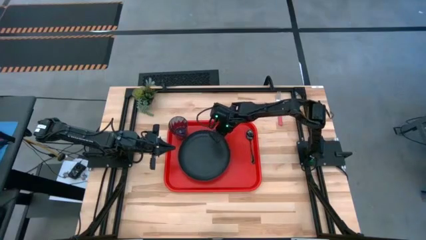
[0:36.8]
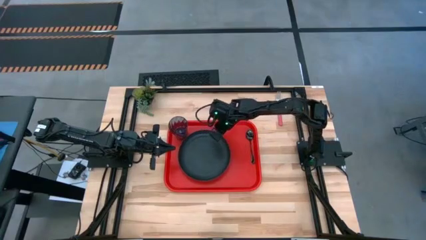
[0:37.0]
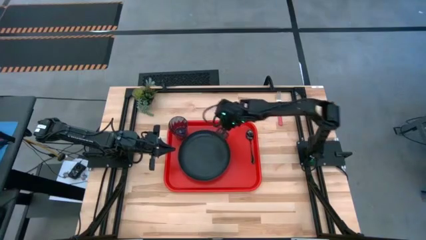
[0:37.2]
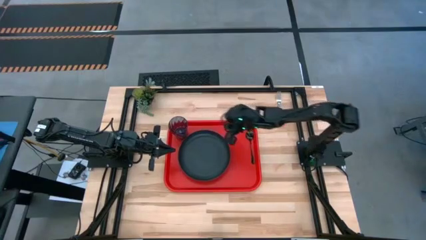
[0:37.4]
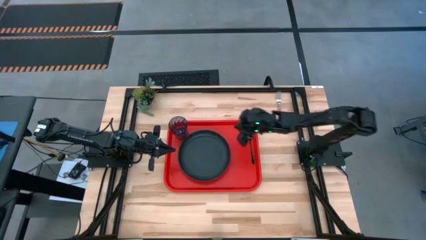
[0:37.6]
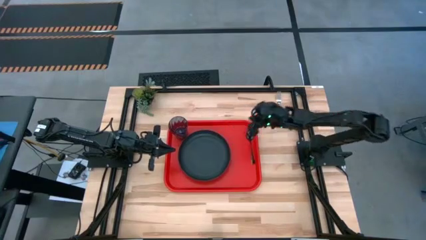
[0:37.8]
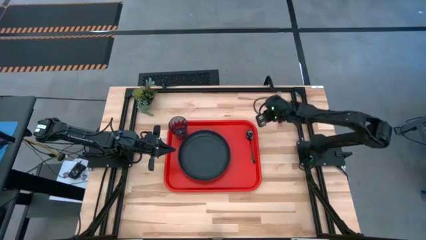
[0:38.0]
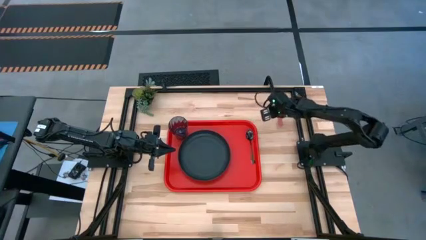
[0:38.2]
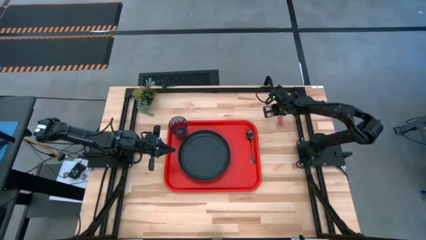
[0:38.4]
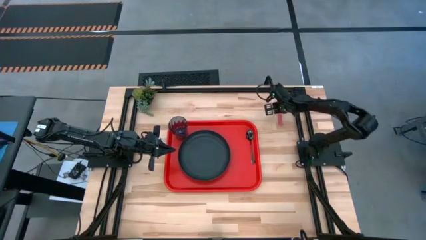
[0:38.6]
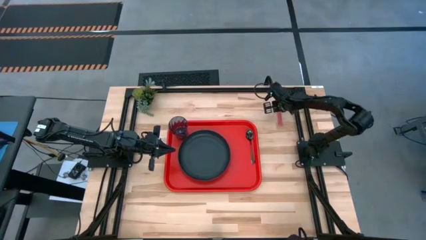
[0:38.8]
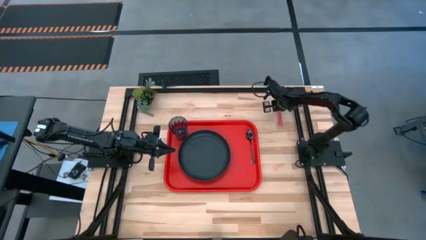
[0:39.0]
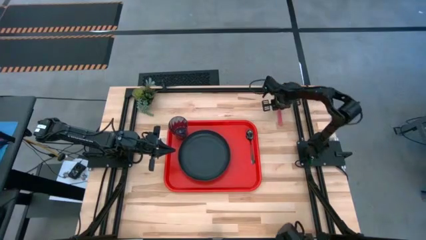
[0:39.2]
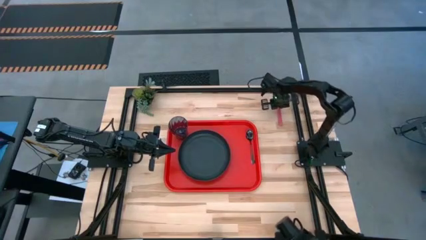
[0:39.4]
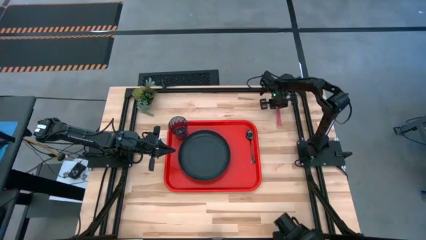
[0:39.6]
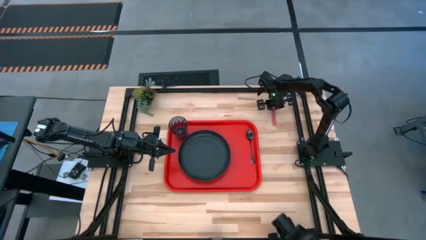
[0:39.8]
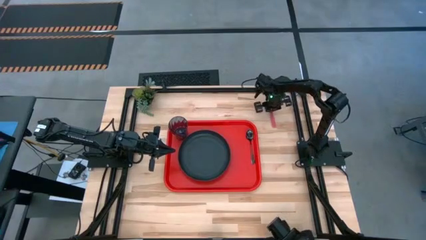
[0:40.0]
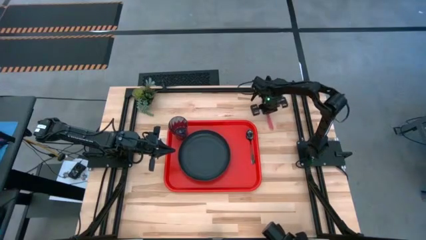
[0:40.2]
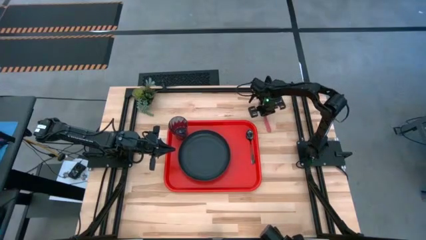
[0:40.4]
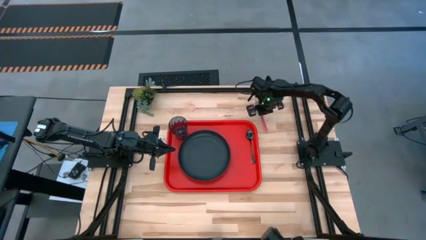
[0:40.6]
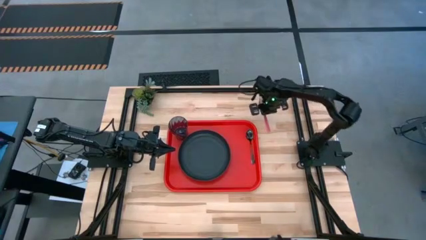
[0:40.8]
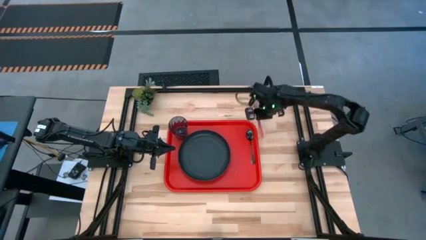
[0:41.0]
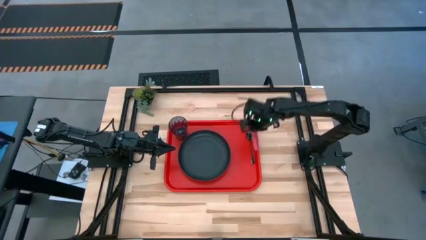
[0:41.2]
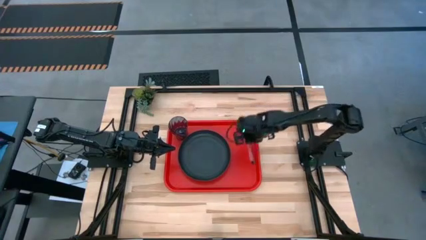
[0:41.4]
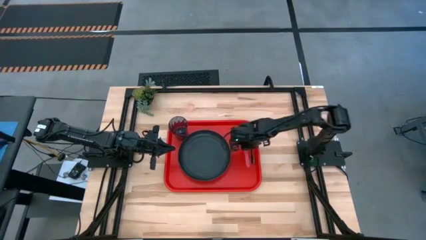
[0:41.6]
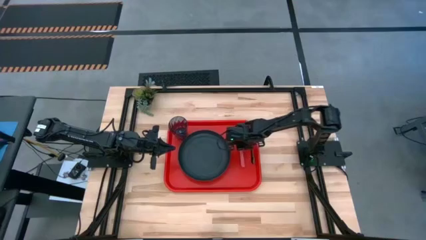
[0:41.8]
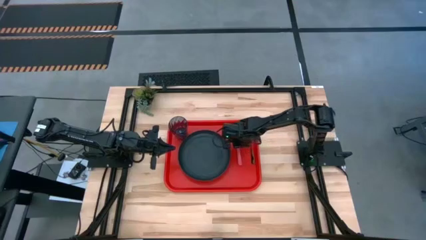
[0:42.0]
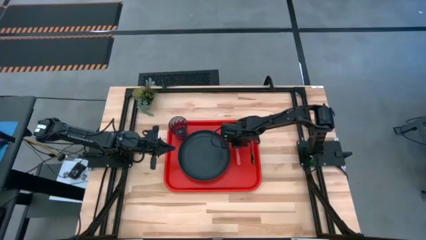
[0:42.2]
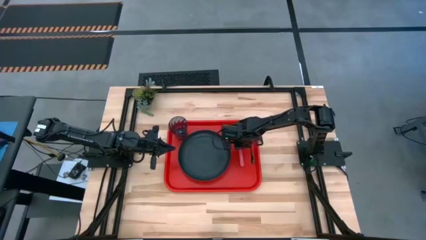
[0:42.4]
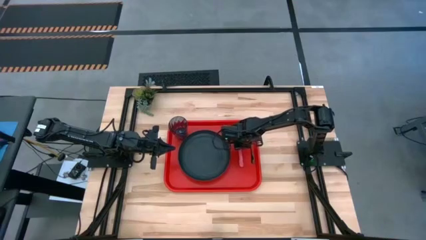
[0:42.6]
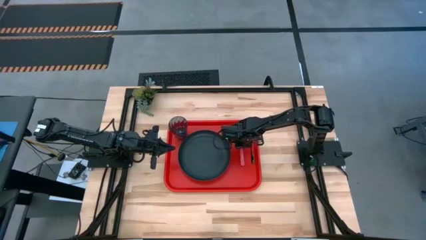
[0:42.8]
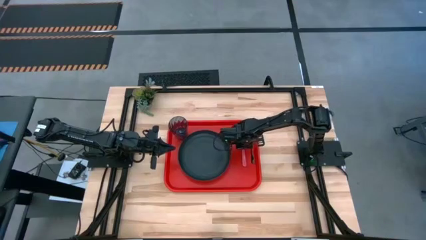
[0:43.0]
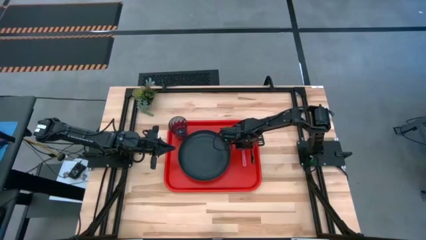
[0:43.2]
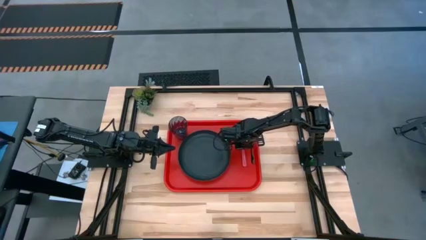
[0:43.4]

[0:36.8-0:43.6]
Task: Pick and place plate/cup/fork/spoon on tray
Put the pink fork on the red serving tray to the right of the black plate

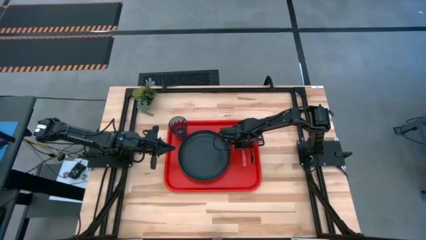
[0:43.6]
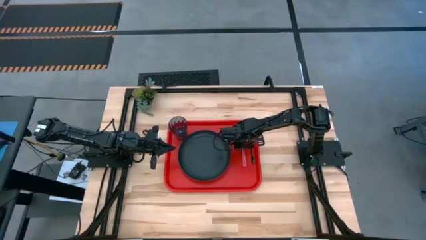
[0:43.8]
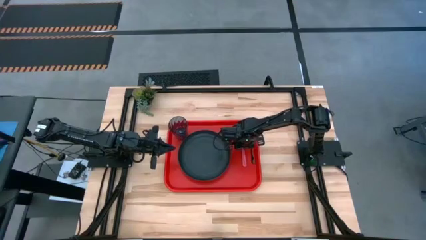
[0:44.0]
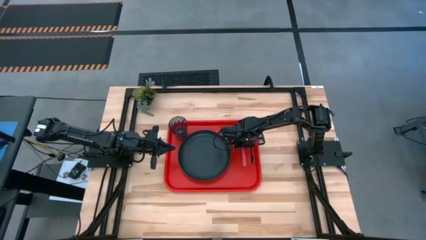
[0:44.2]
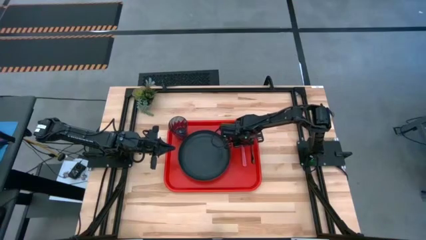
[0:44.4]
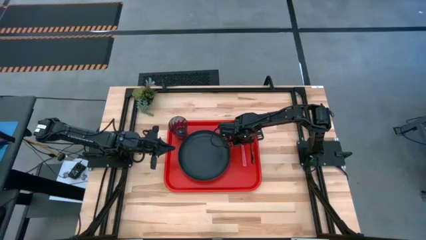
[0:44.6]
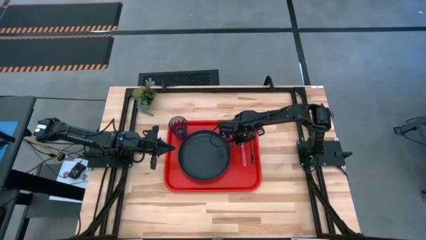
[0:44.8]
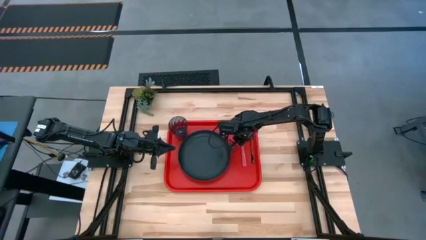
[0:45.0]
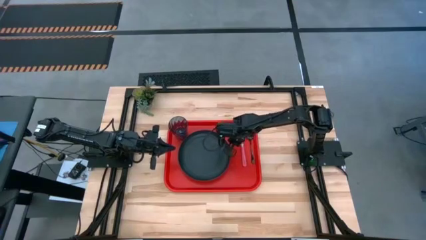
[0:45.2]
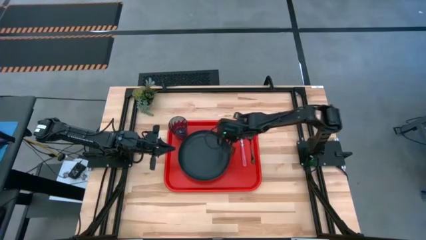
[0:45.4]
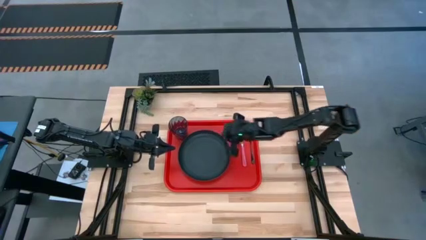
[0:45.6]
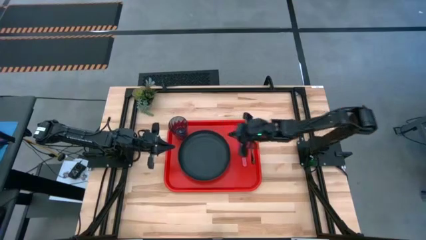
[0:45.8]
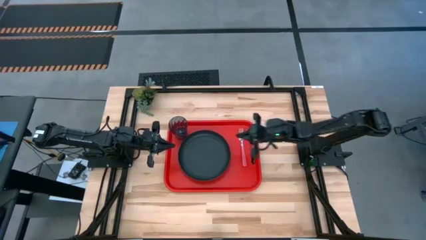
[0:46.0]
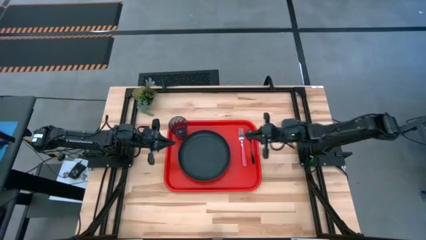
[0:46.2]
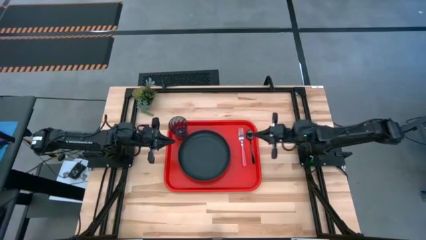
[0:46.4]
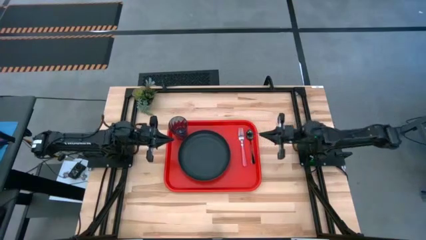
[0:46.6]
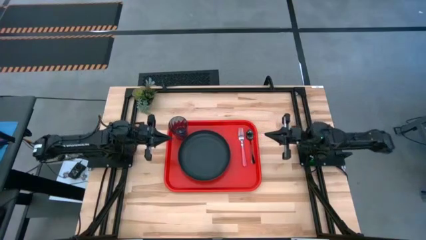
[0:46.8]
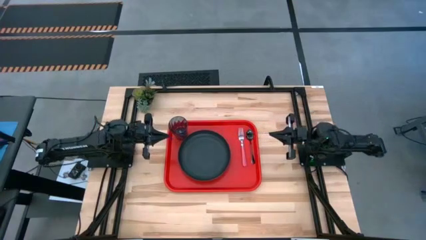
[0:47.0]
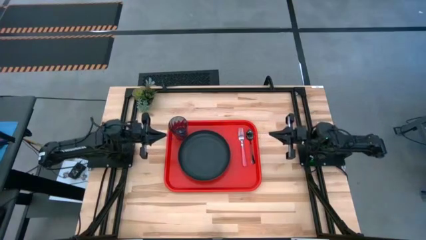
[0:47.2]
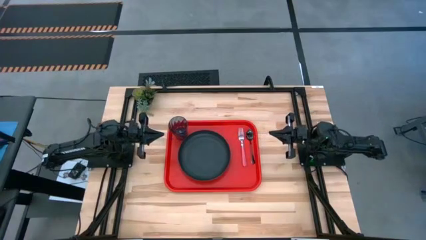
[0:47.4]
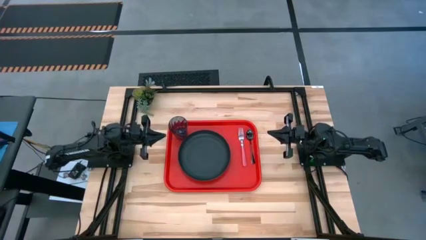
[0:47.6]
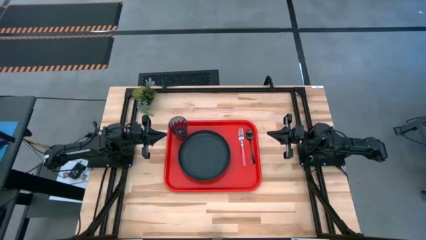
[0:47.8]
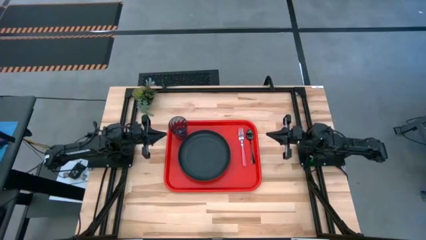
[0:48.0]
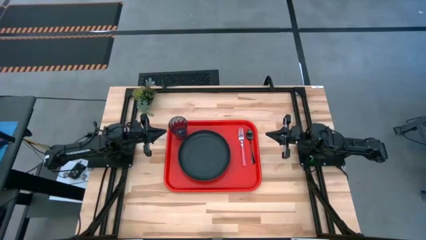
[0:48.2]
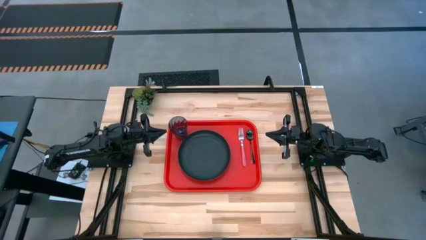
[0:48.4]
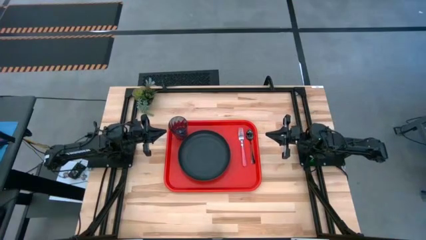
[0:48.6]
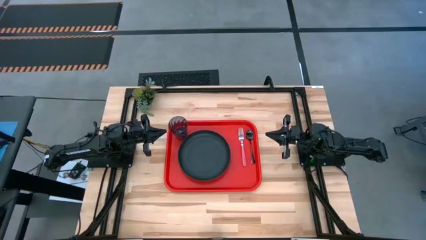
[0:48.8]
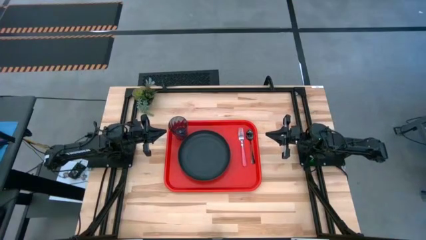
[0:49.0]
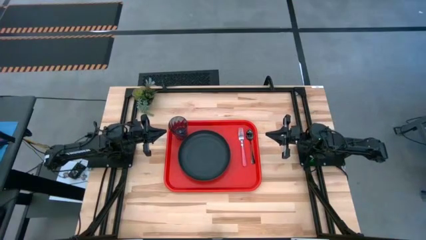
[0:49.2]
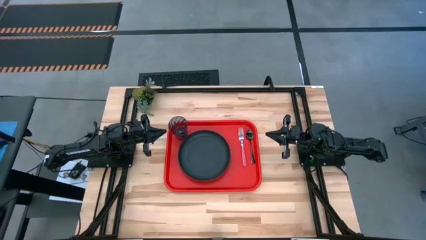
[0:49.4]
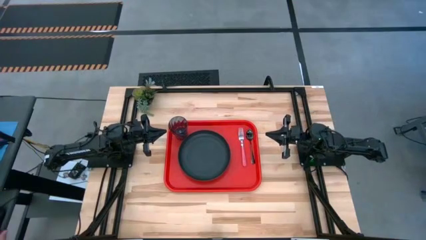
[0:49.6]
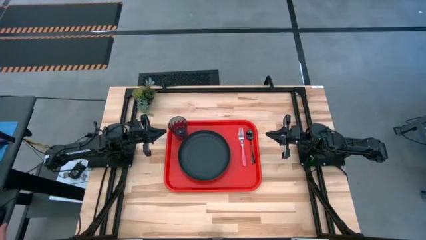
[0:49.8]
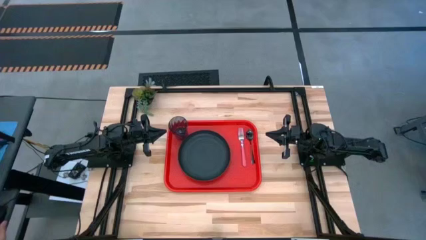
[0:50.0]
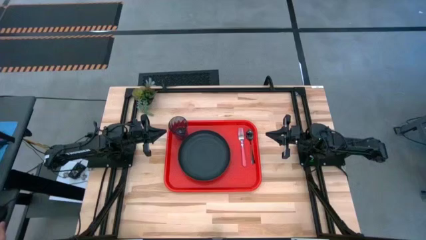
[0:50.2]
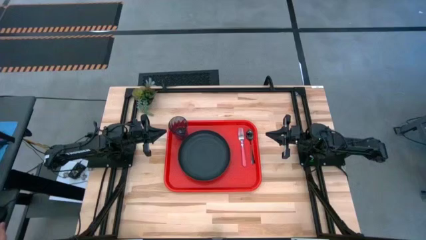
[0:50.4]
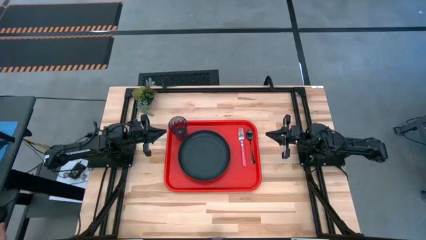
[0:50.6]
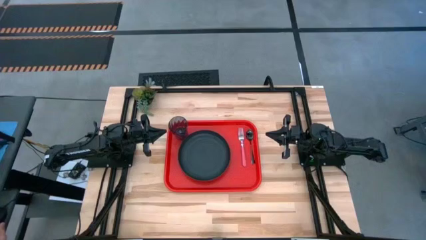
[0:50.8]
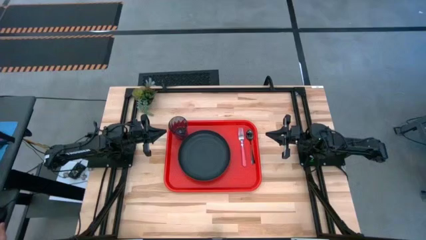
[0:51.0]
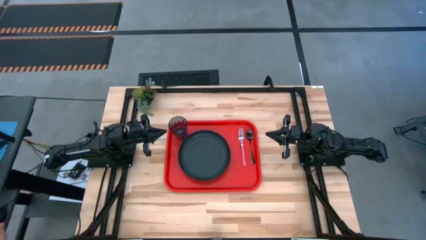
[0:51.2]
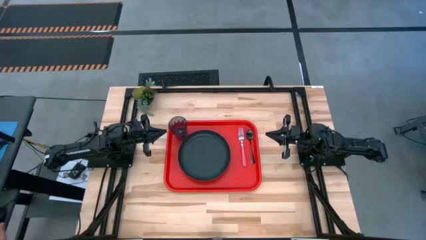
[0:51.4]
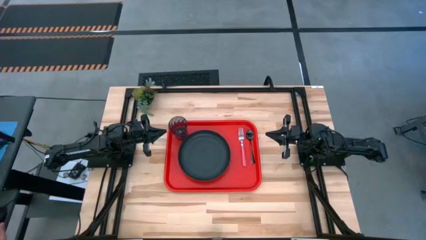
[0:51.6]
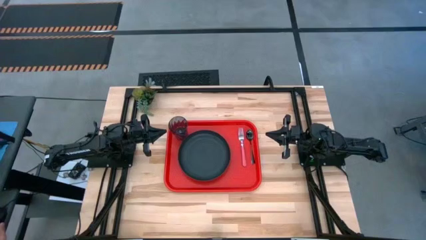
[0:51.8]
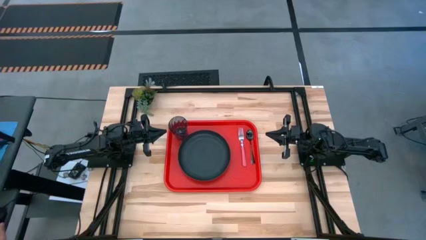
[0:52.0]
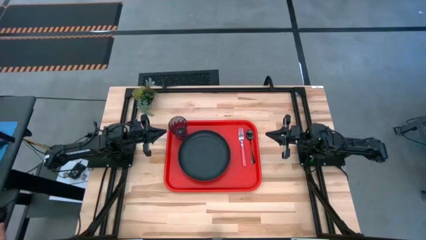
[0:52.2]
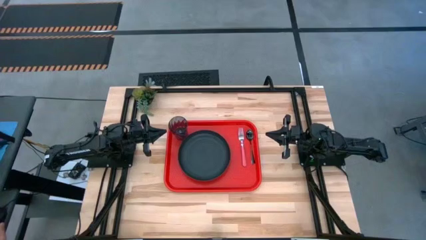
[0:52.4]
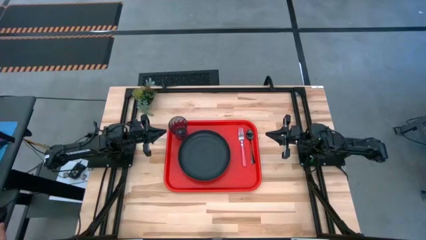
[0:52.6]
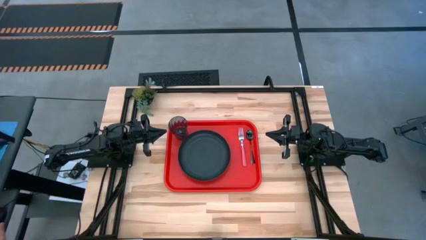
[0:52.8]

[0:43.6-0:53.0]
Return to Home Position

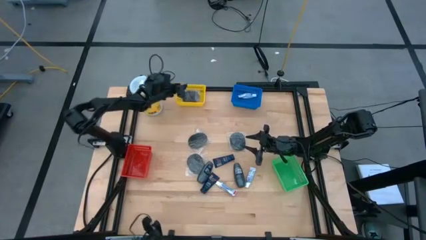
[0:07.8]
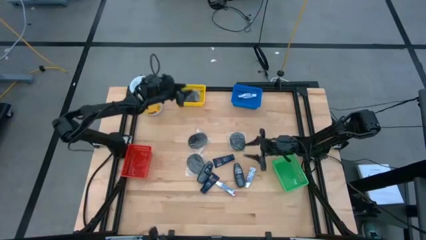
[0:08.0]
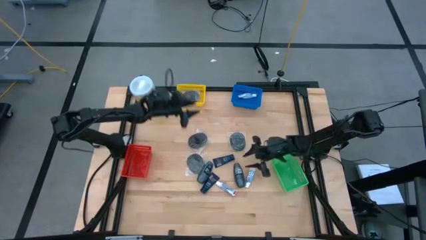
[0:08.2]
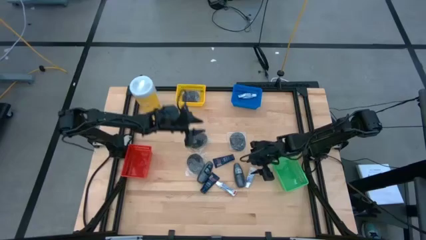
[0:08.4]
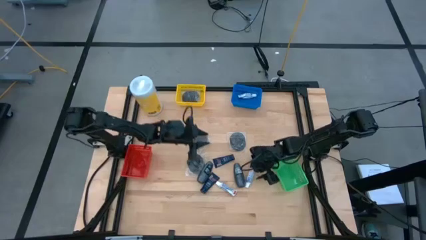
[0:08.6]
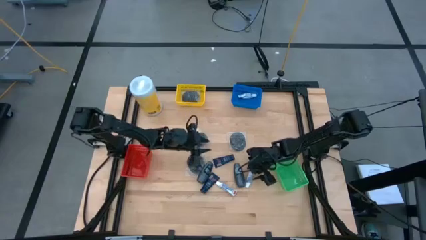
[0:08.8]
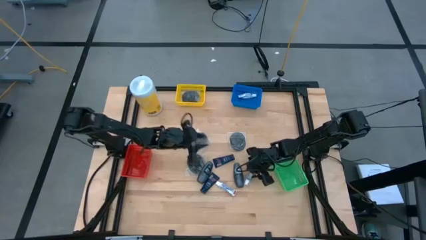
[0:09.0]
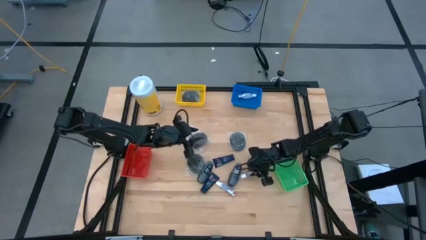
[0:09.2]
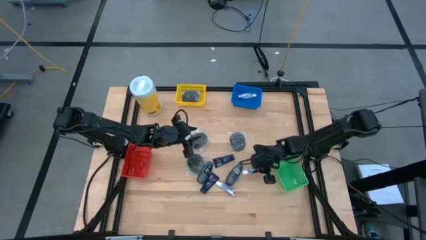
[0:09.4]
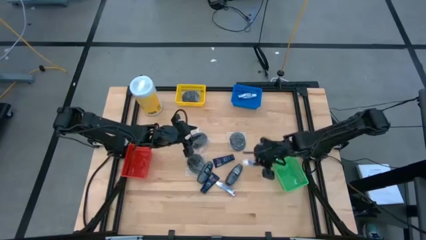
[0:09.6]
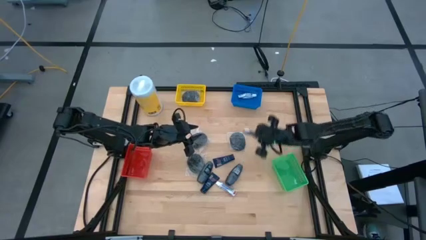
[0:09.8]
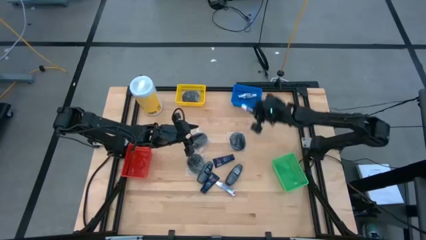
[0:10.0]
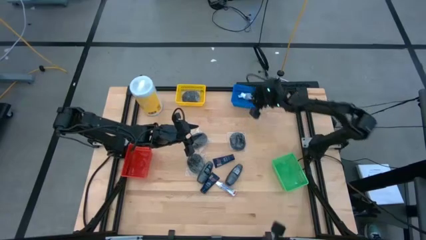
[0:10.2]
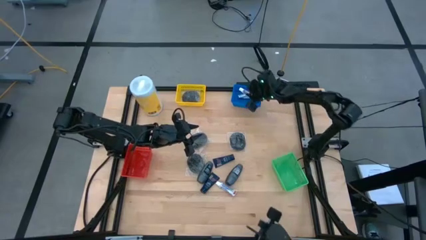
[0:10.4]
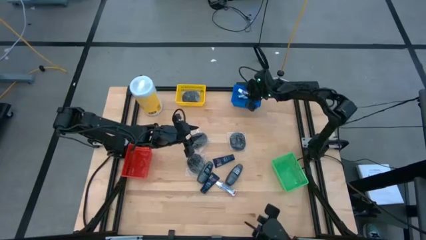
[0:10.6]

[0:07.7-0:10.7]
Task: Pick & Place Travel size toiletries
Put the purple toothpaste into the blue bin
